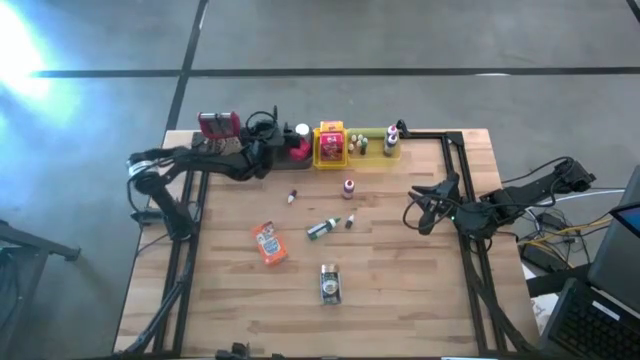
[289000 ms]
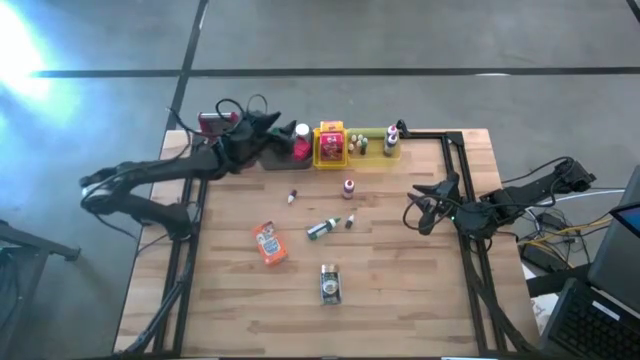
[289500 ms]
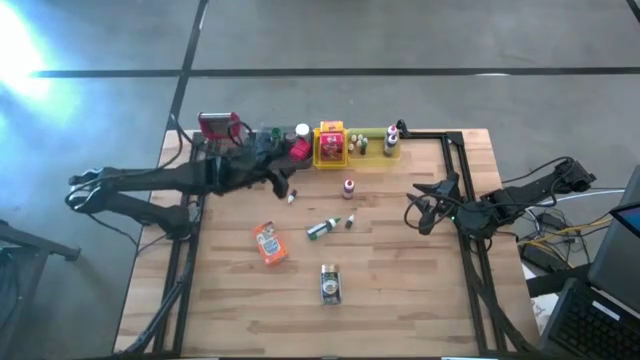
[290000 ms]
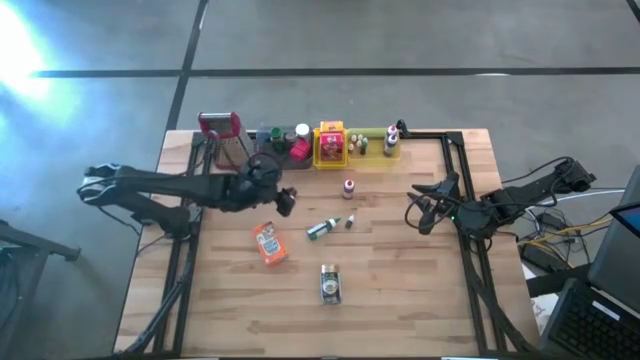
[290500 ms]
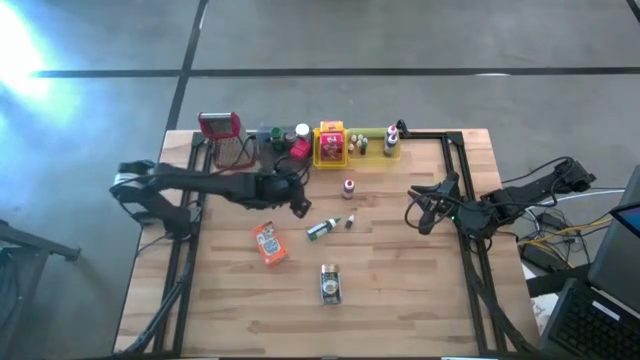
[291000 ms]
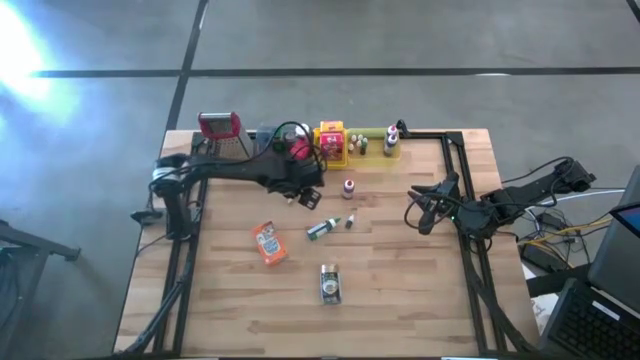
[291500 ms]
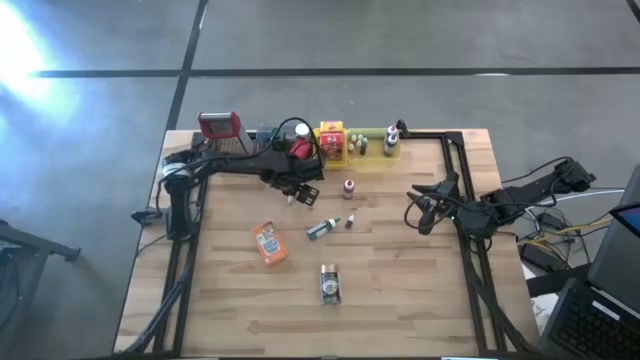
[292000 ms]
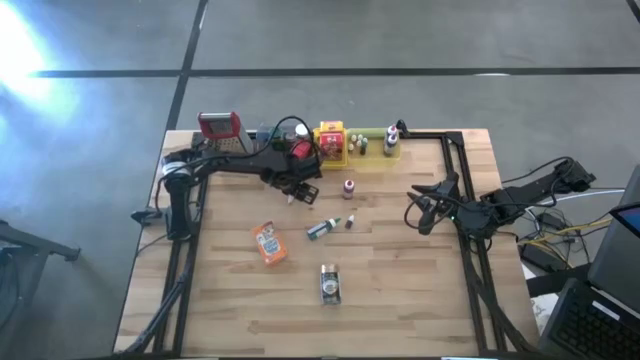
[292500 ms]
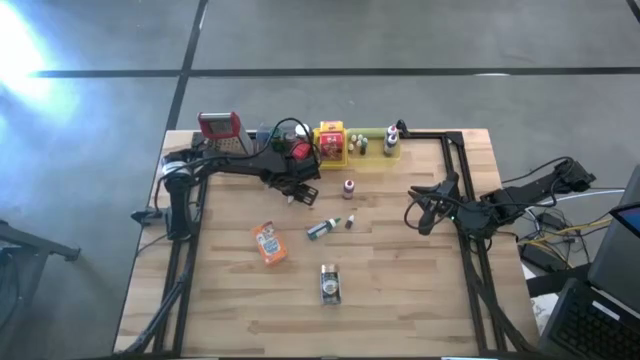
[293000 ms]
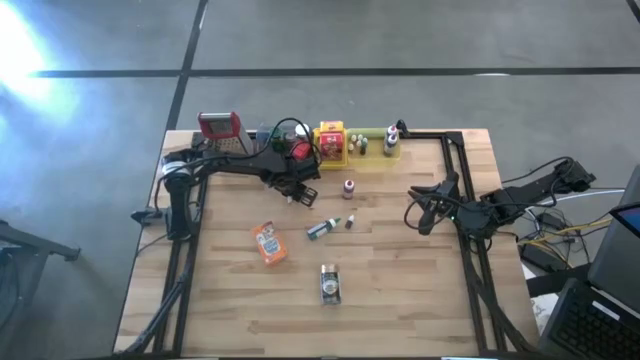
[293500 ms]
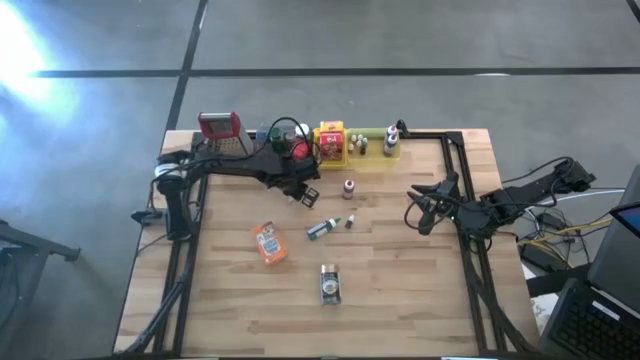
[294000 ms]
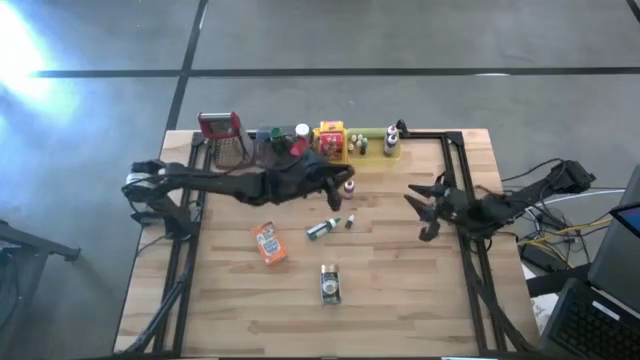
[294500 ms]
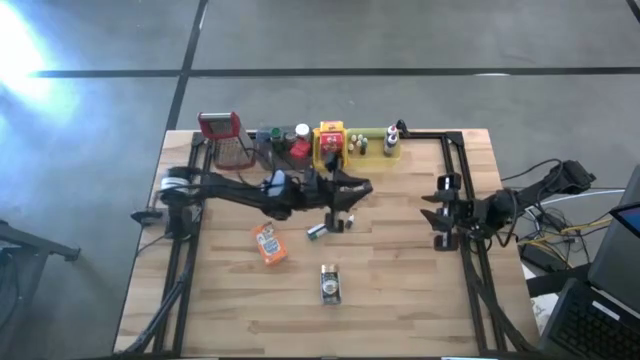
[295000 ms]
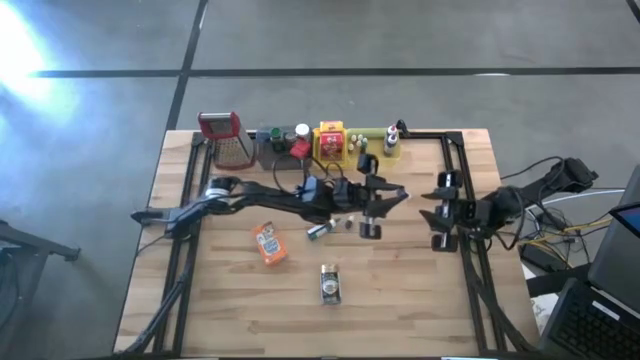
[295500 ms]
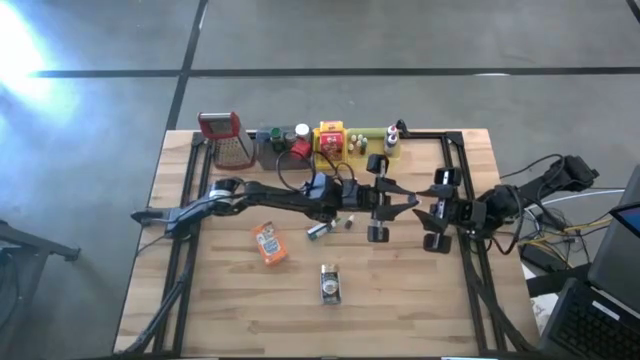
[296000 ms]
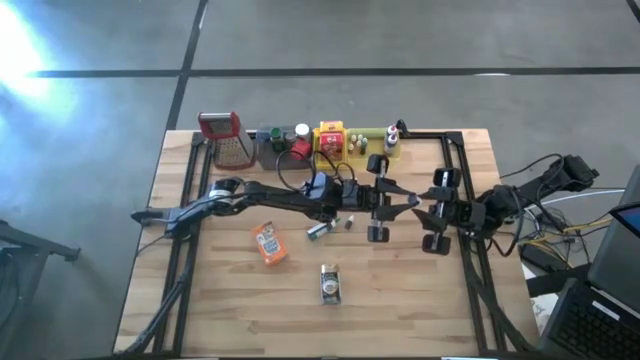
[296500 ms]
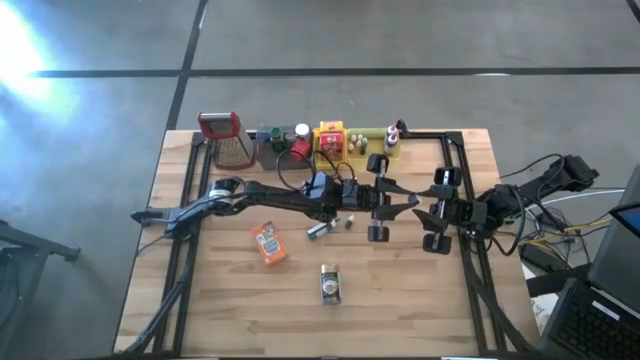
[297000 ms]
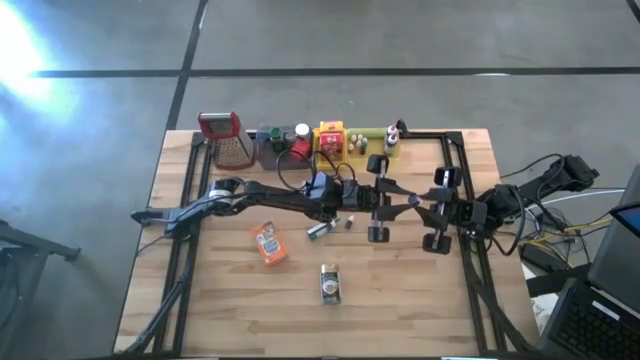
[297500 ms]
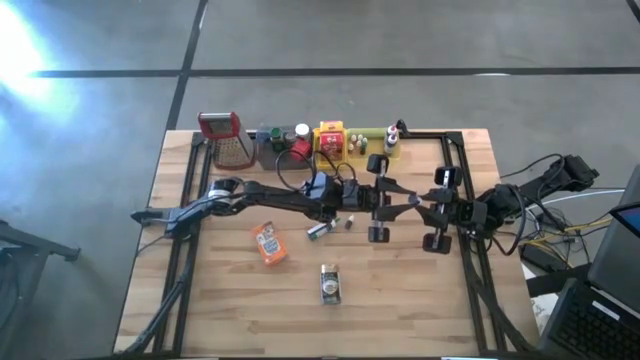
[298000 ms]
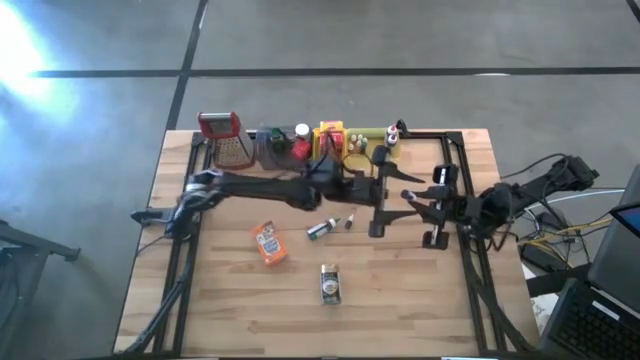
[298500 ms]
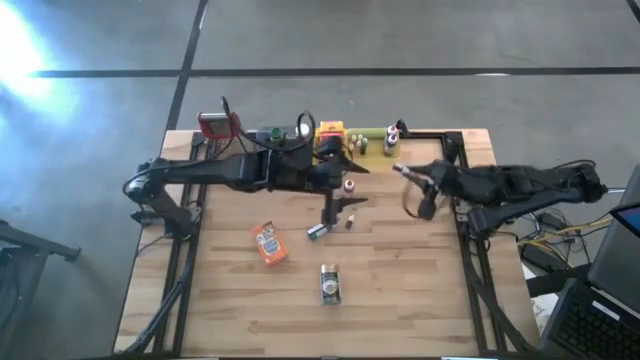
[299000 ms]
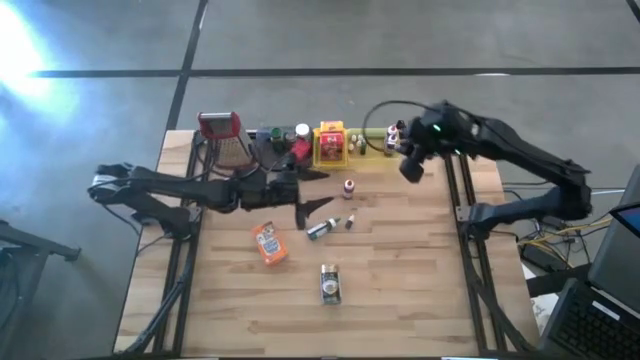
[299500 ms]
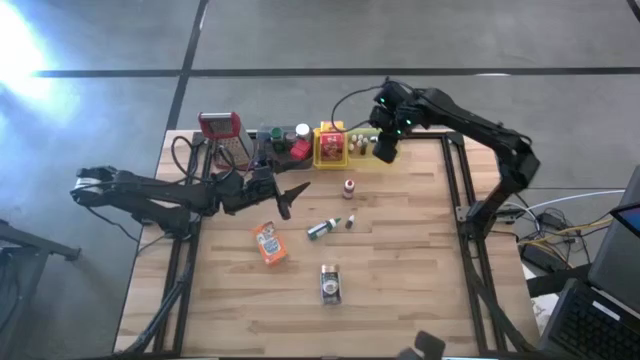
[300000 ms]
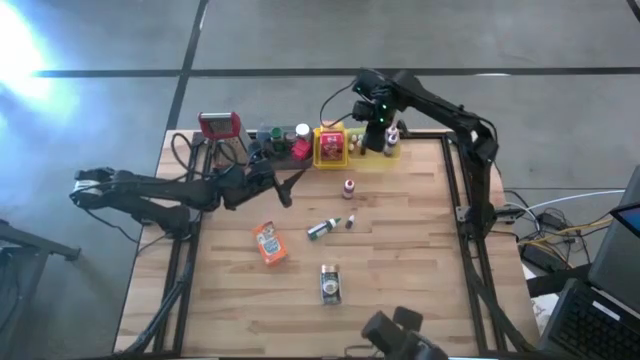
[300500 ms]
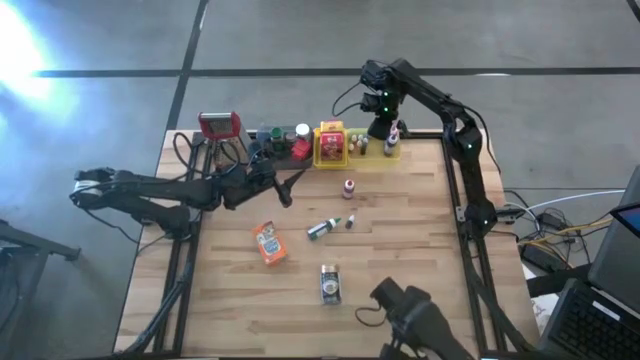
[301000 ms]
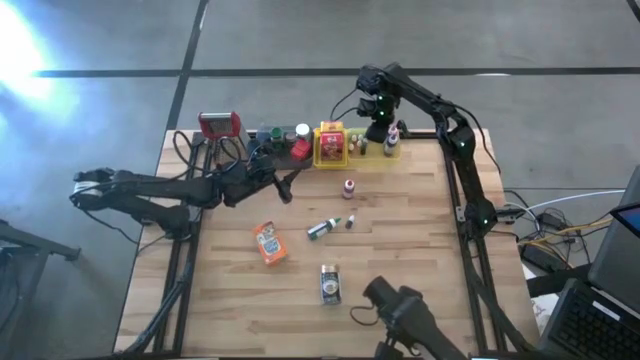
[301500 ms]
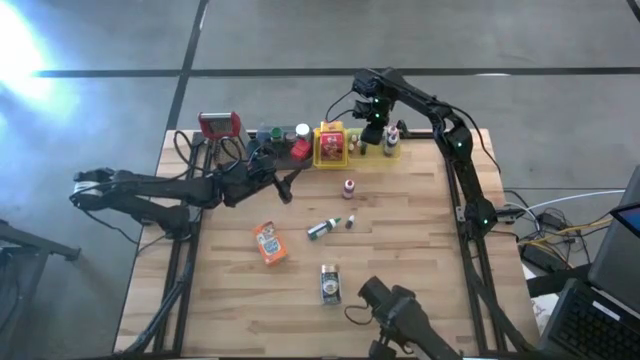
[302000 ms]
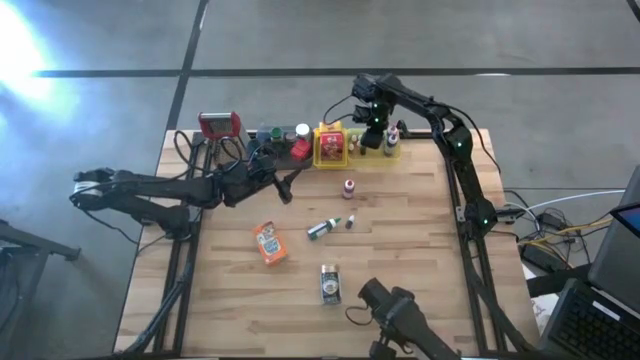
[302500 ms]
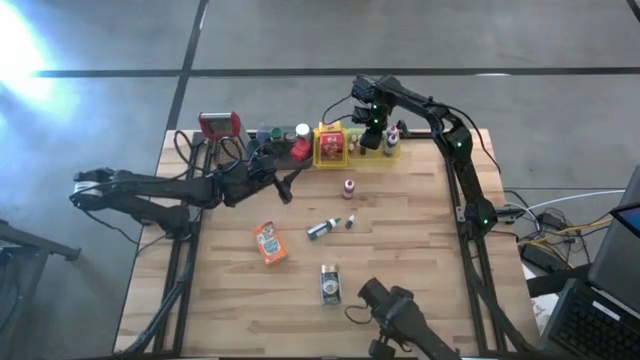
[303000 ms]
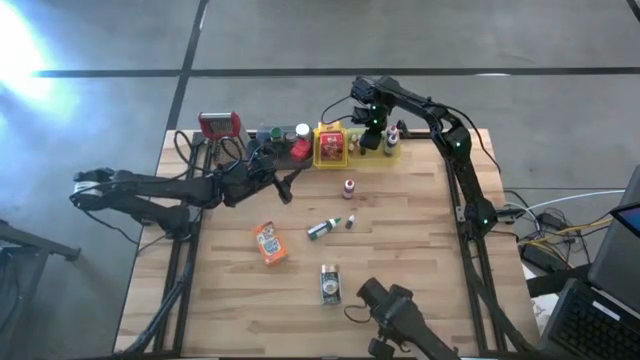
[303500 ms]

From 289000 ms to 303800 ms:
Task: Pick & Place Kitchen Items
Put the black food coloring bottle into the light yellow bin

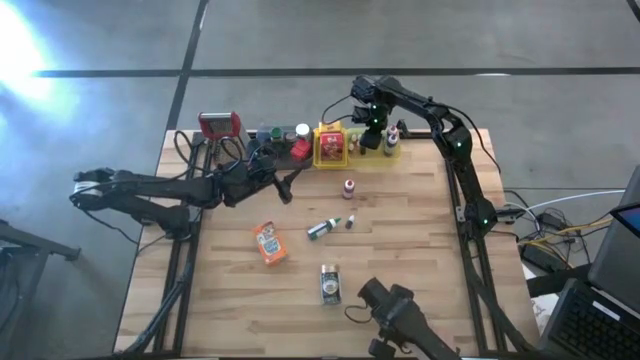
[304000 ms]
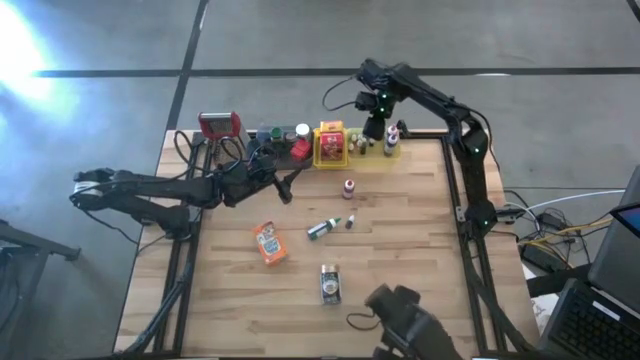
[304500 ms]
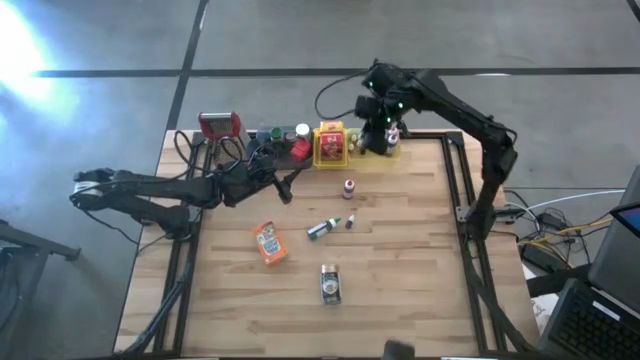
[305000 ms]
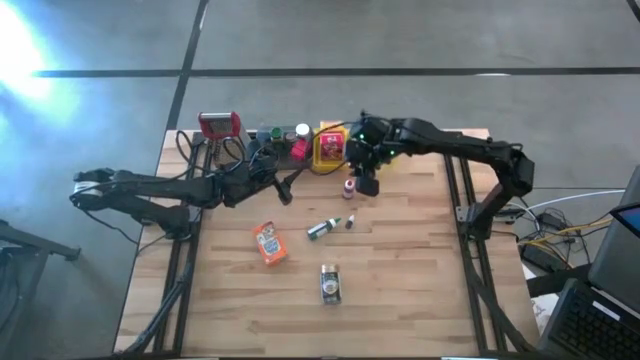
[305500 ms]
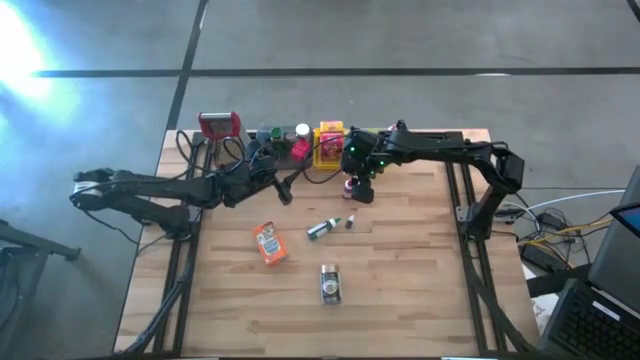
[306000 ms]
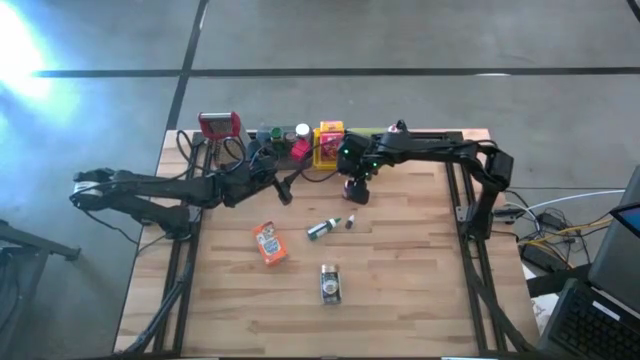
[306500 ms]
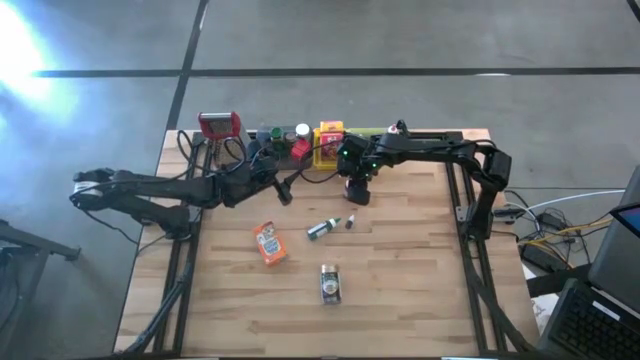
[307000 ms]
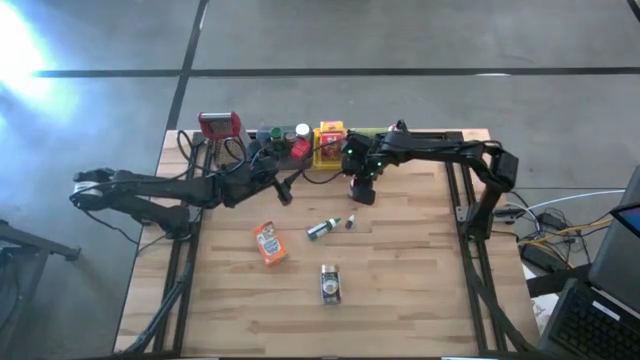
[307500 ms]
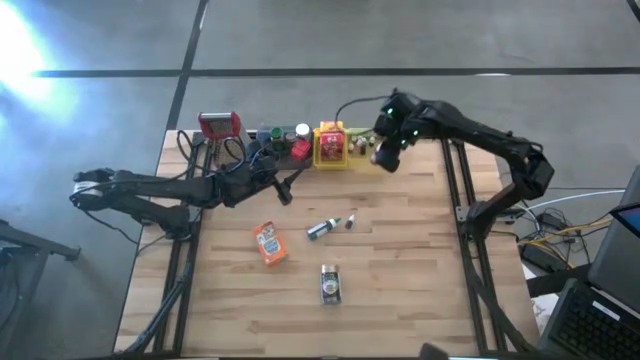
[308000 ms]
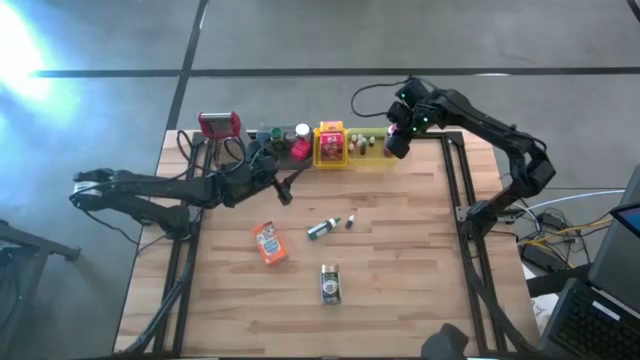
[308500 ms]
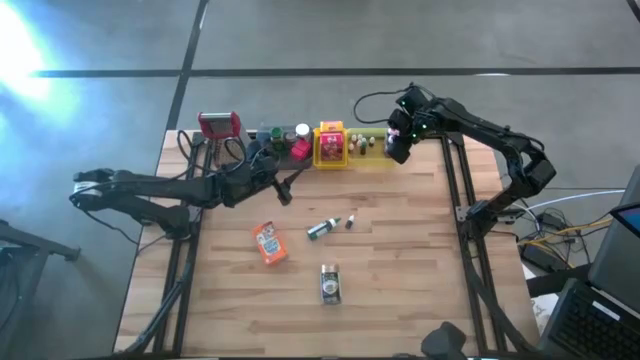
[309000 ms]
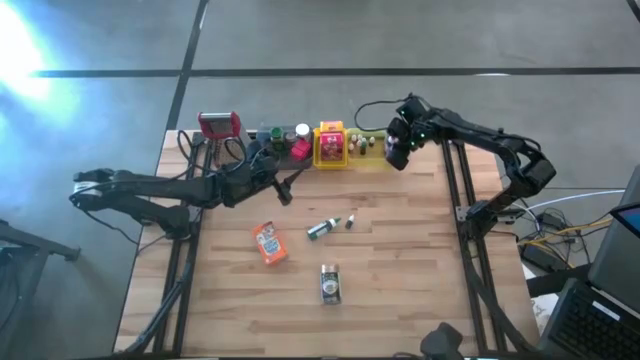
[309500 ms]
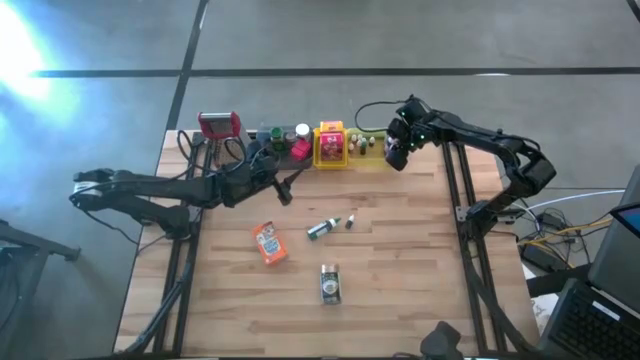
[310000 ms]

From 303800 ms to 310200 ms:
Put the large red food coloring bottle into the light yellow bin
